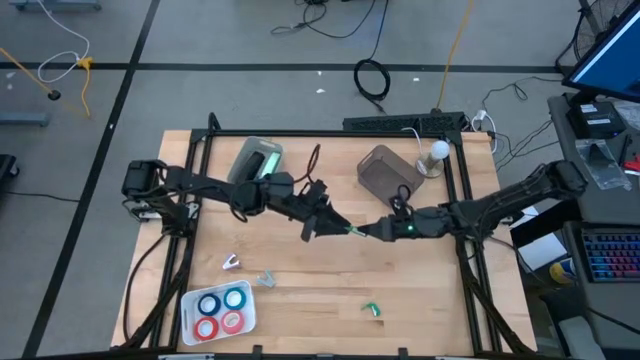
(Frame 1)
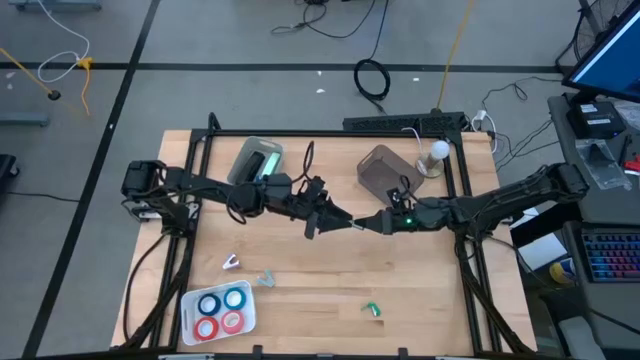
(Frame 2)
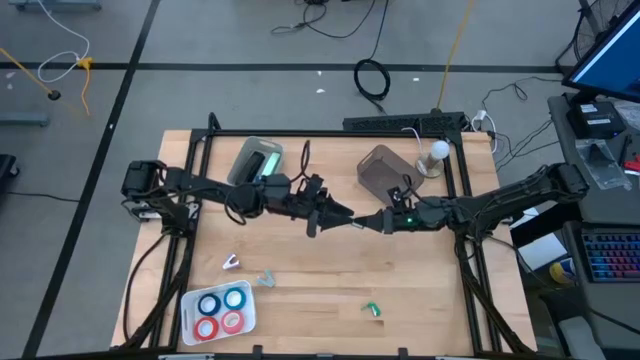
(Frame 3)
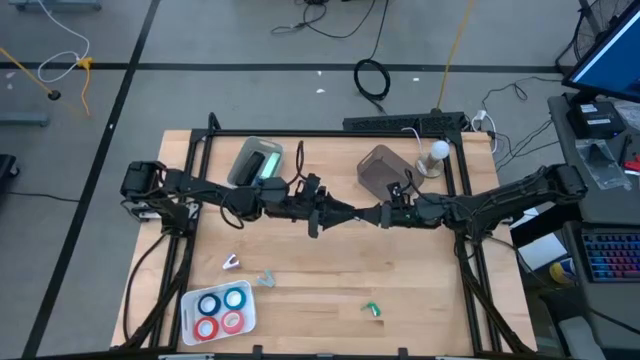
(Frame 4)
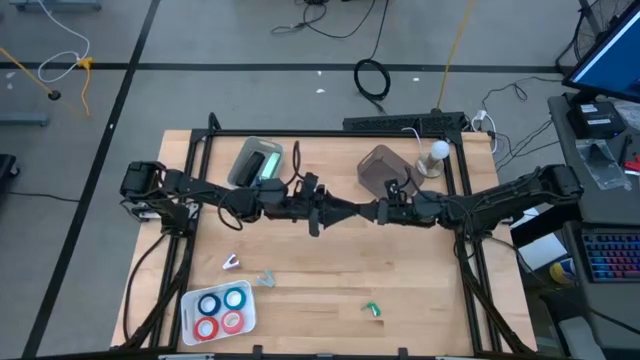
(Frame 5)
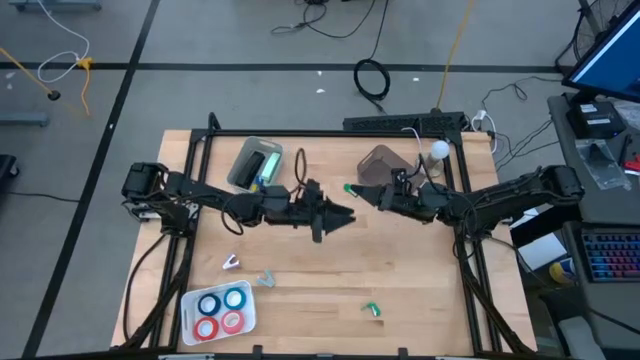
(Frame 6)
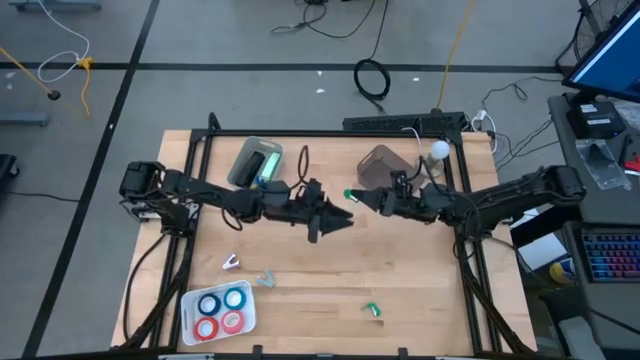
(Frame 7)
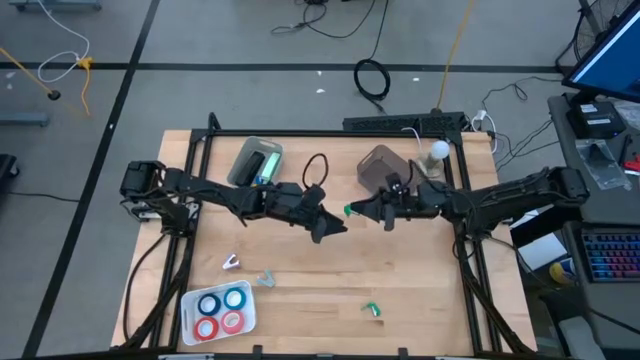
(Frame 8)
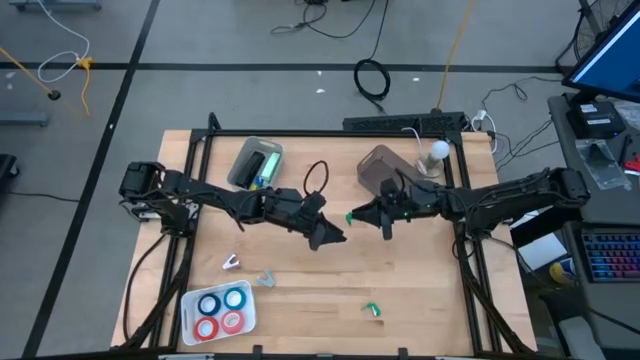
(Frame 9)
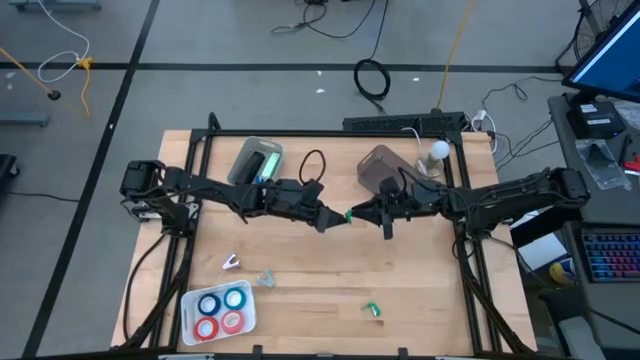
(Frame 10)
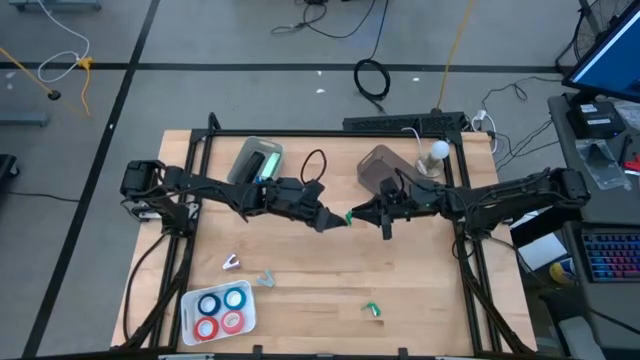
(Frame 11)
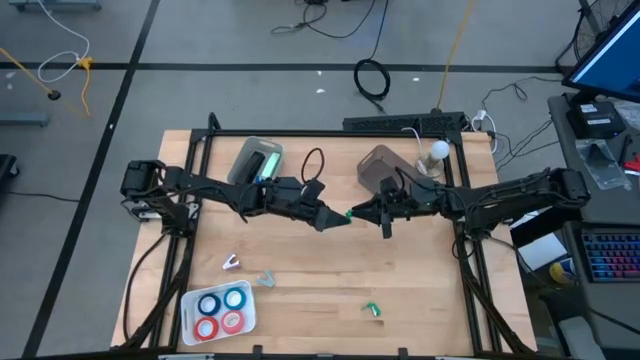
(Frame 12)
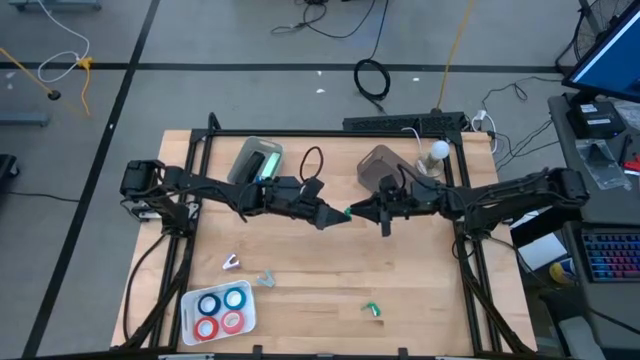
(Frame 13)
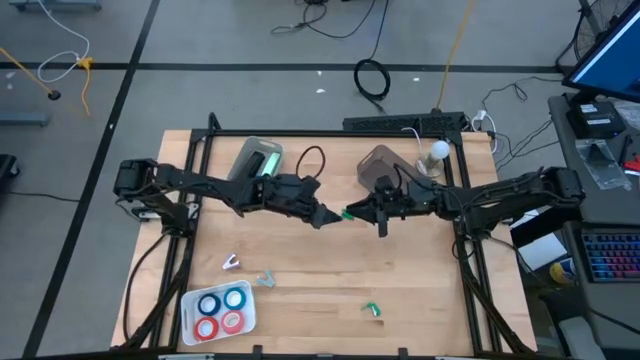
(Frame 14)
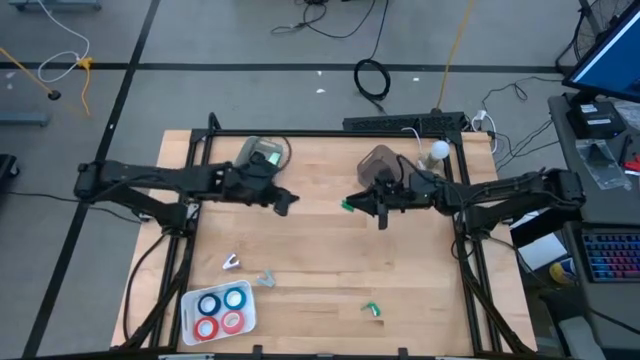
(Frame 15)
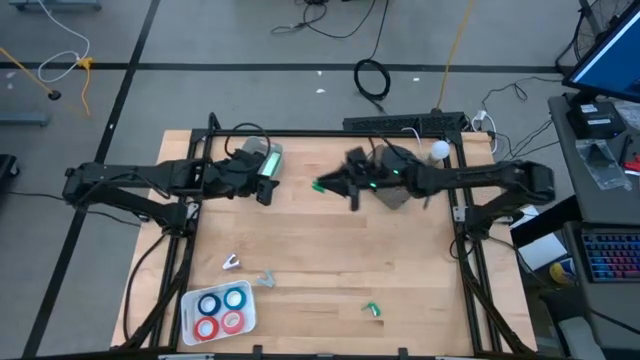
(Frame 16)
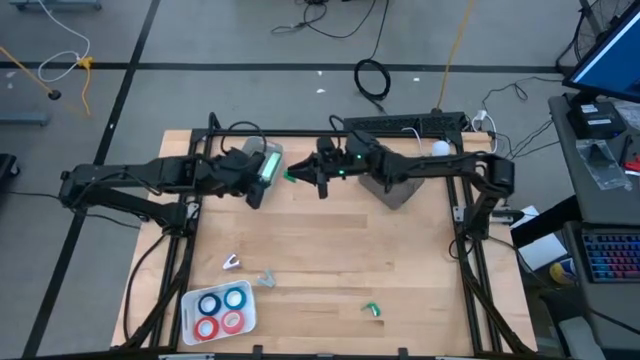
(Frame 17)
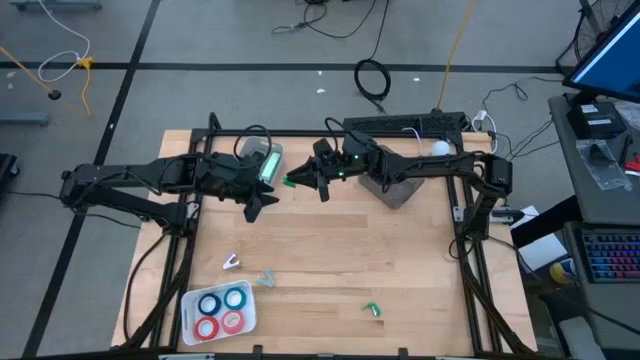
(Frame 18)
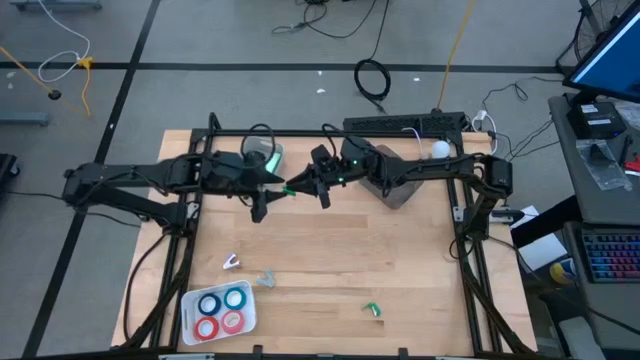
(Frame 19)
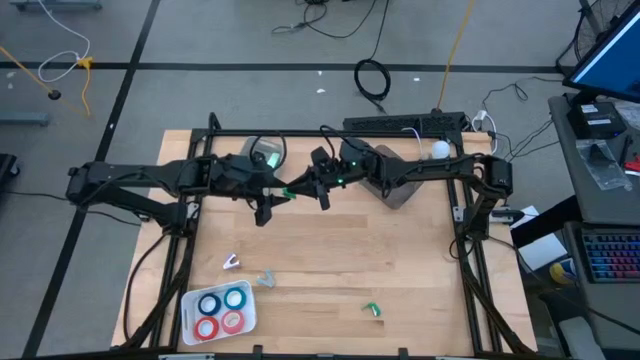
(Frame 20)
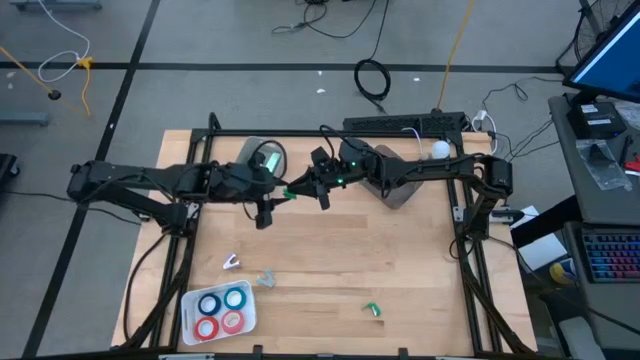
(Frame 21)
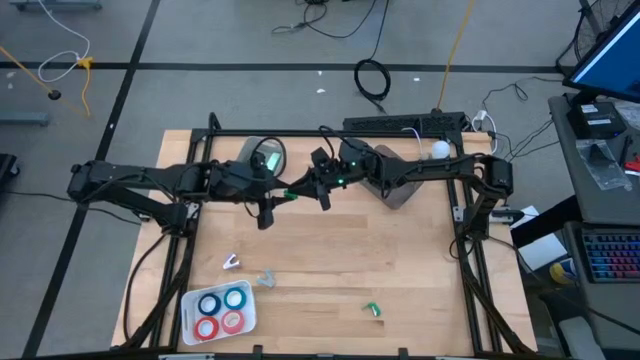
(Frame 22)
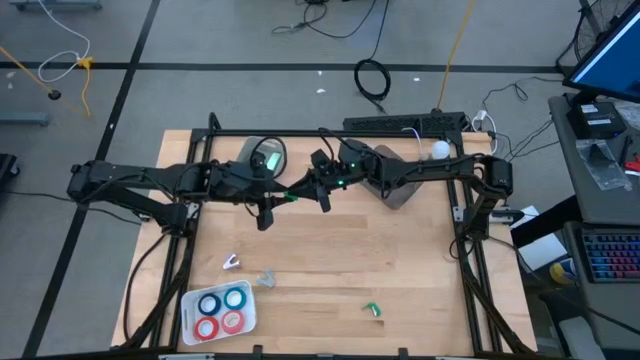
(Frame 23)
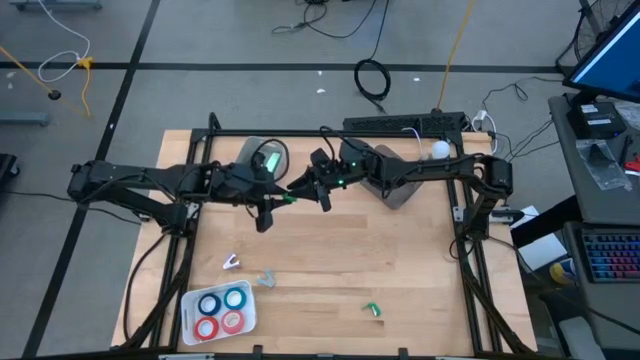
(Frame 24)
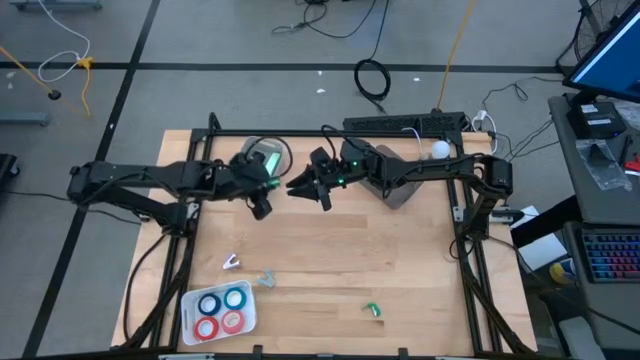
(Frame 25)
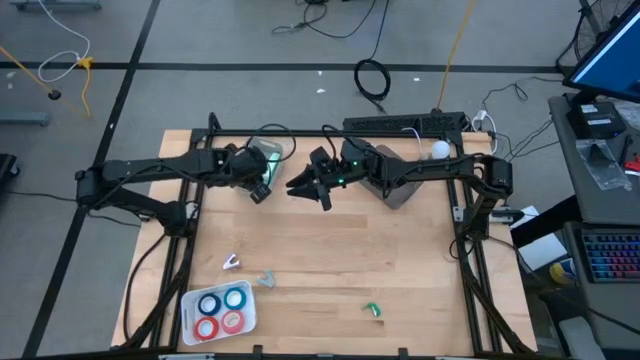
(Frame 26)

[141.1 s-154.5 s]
Task: Pick and place Stapler, Stapler remover, tape
Put the right green stapler into the gray bin

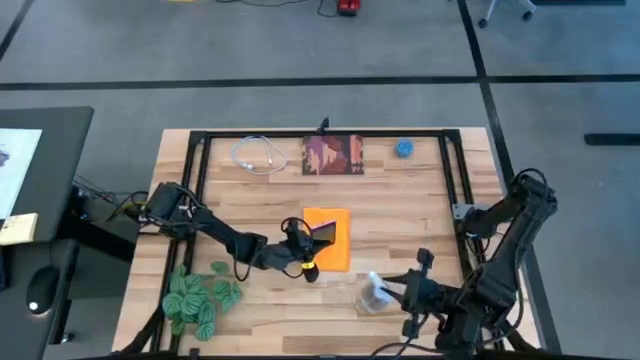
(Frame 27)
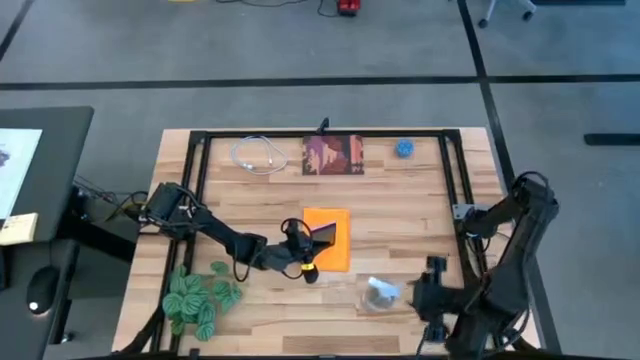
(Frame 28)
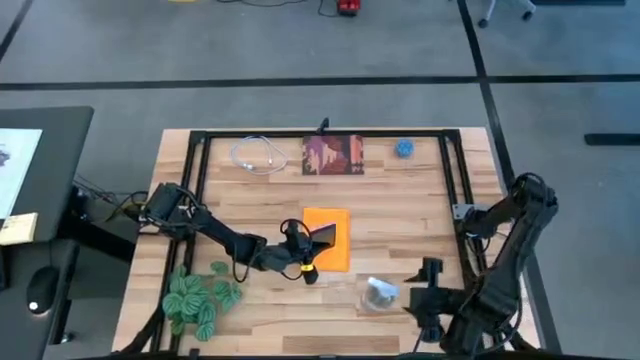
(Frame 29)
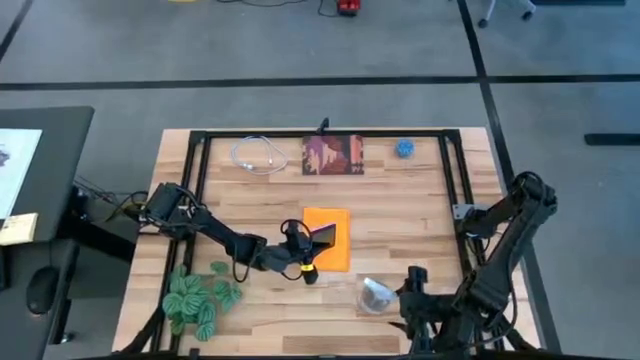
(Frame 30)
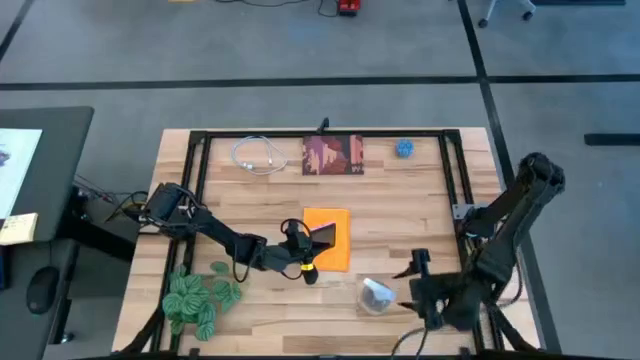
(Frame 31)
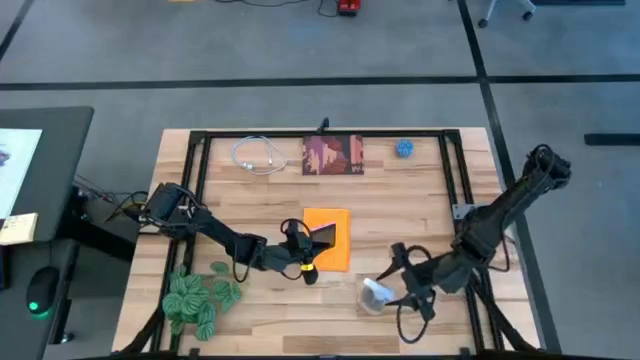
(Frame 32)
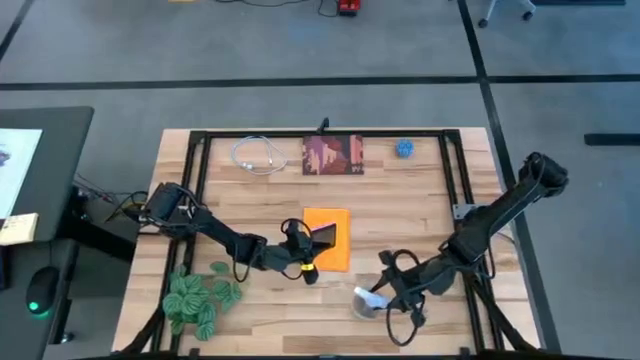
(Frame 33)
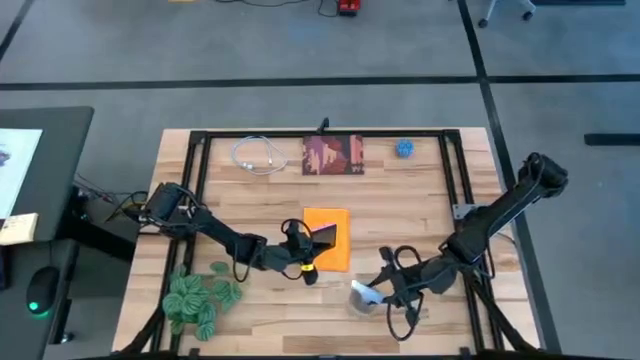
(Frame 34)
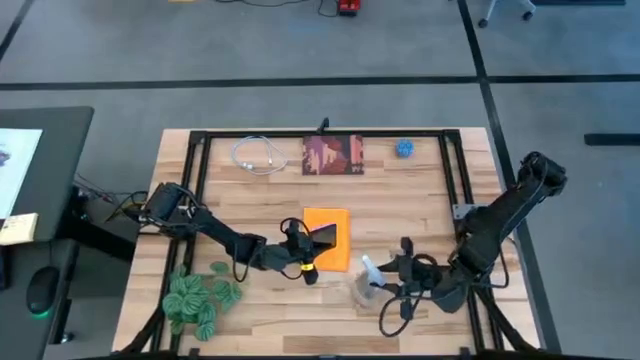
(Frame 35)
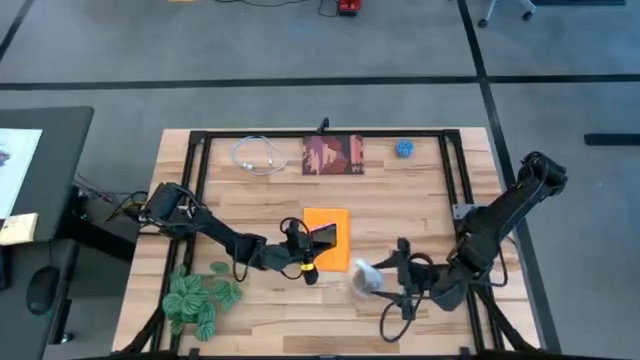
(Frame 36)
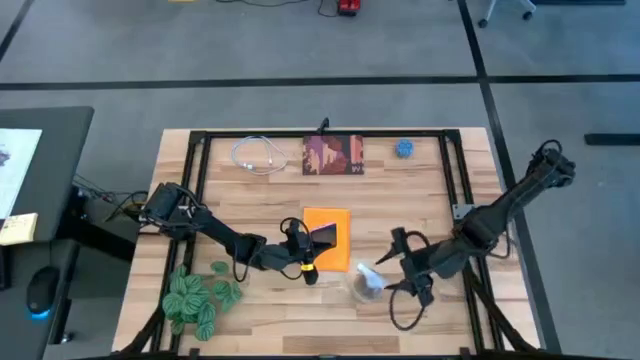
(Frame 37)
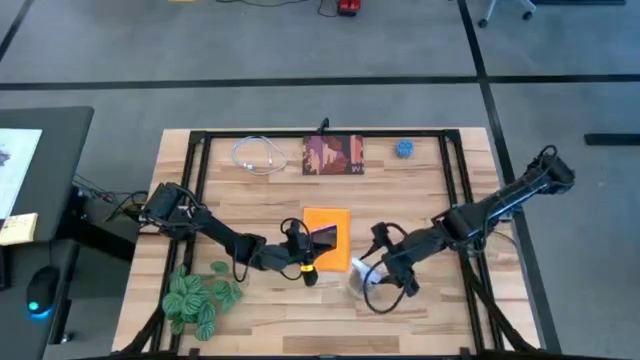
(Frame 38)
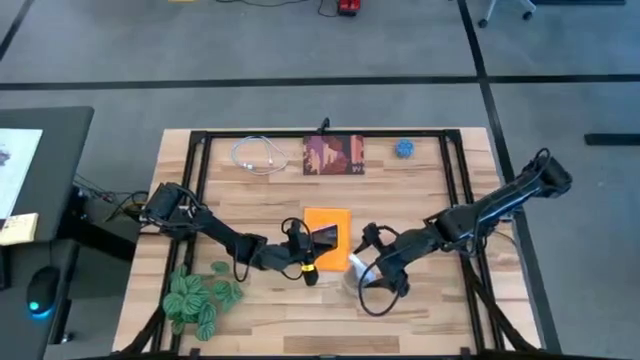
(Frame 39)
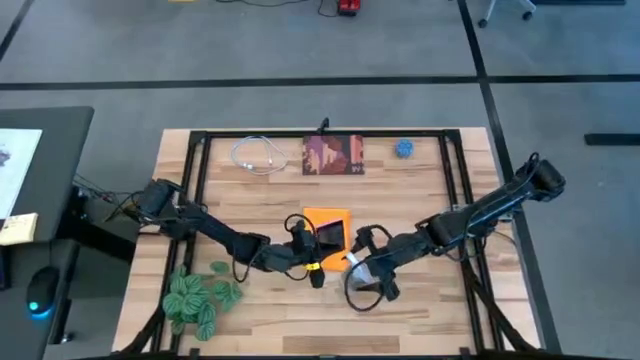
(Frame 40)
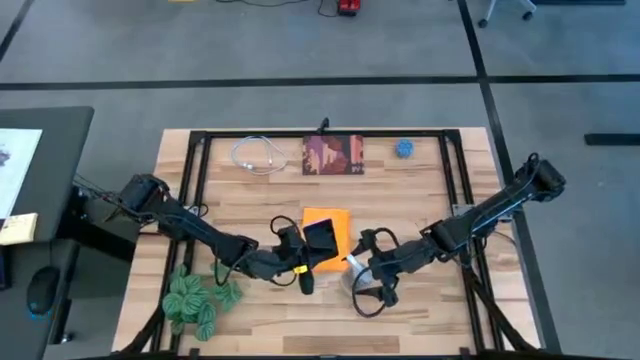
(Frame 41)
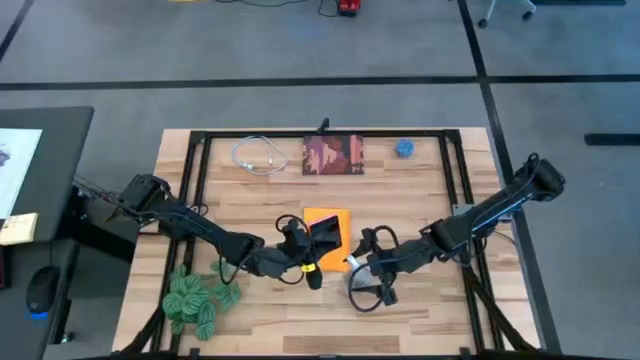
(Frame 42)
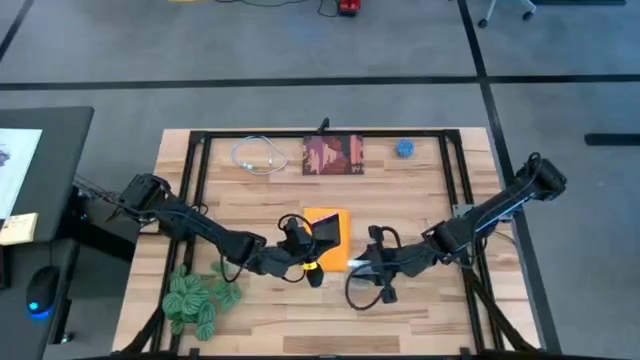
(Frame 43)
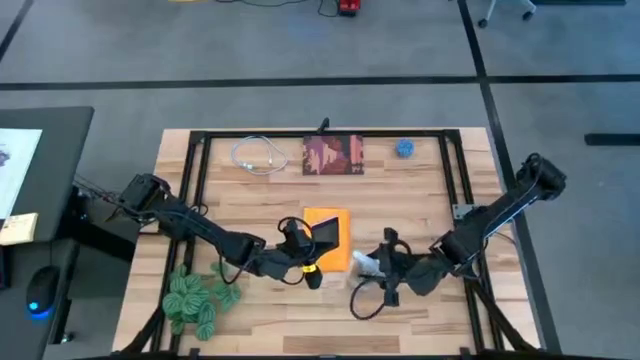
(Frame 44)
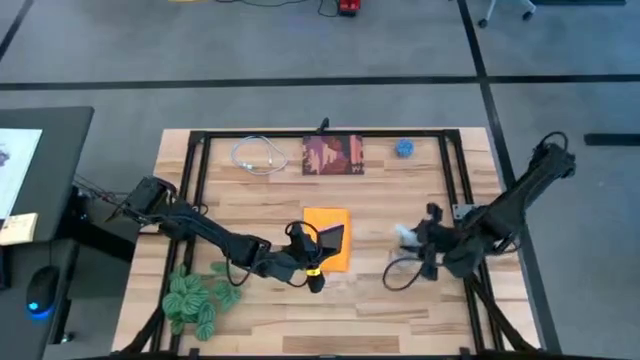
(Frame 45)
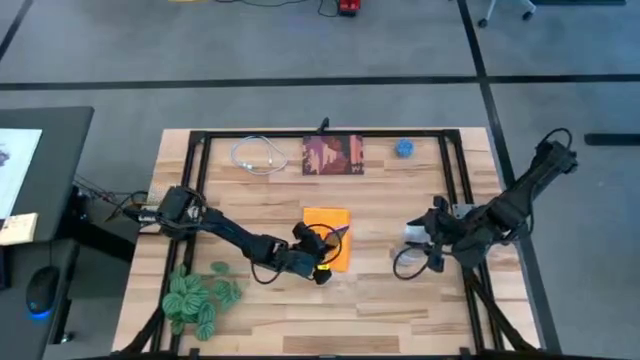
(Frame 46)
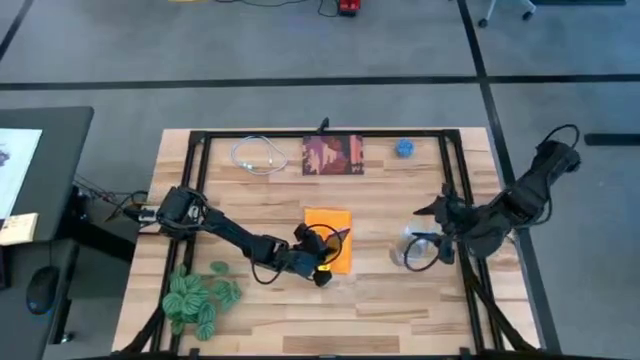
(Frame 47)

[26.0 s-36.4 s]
Task: Apply microfiber cloth
Spray the front of the pink cellphone with the spray bottle
